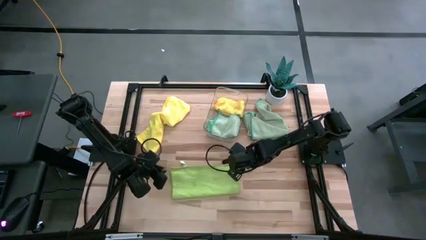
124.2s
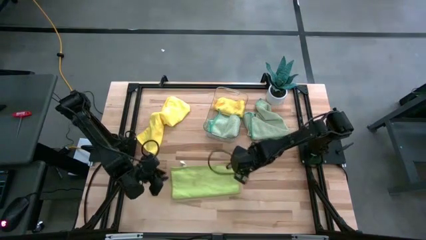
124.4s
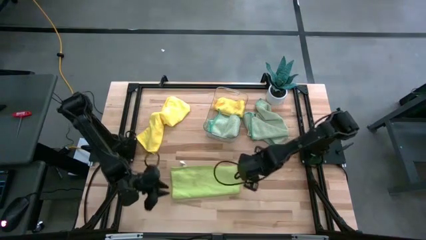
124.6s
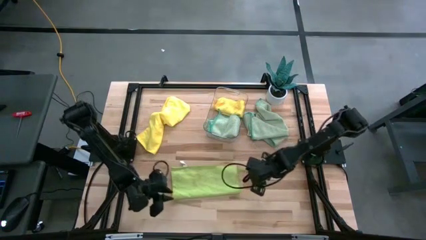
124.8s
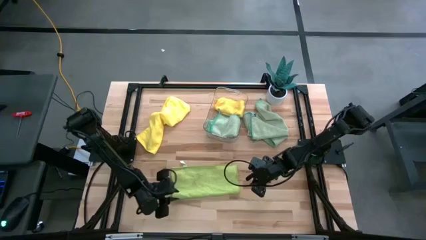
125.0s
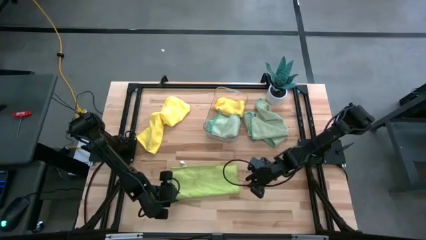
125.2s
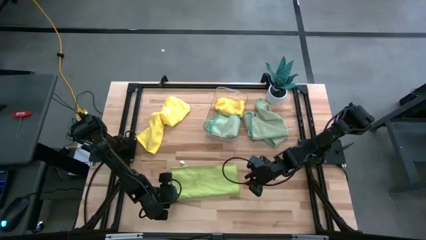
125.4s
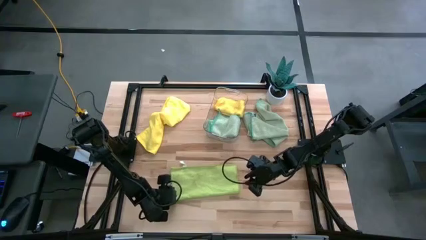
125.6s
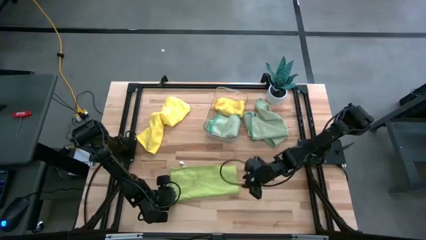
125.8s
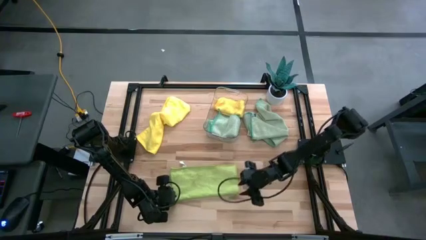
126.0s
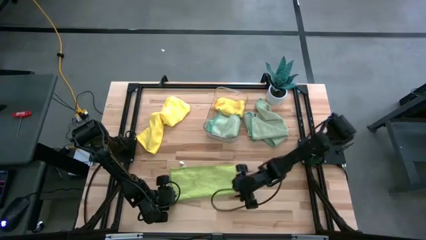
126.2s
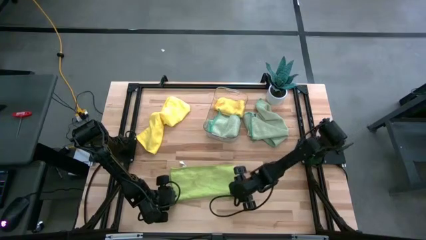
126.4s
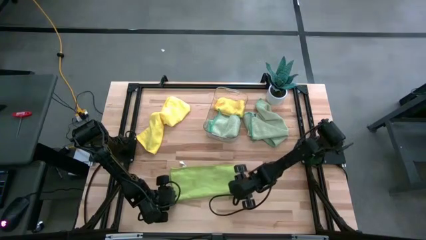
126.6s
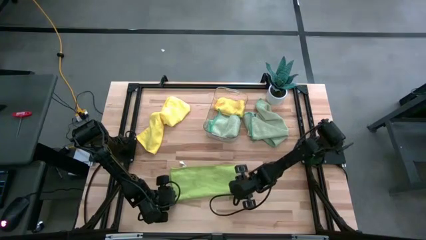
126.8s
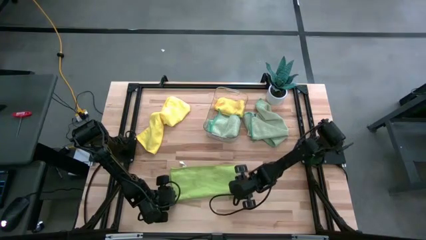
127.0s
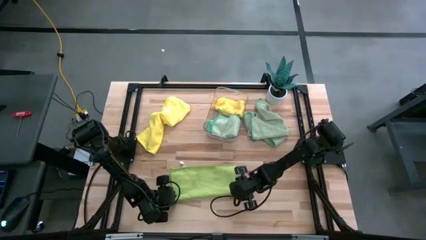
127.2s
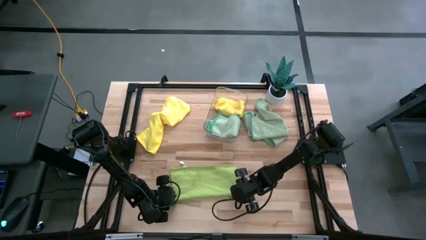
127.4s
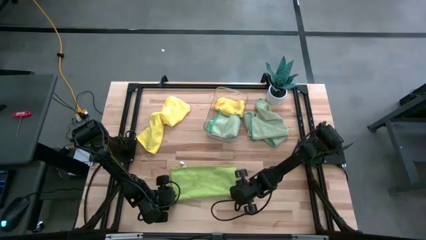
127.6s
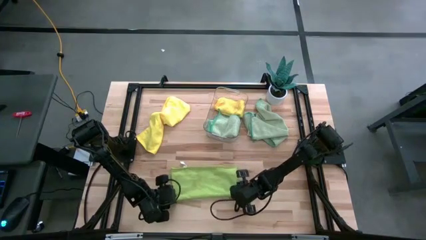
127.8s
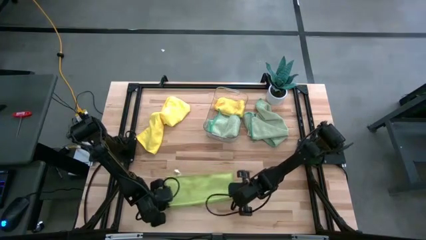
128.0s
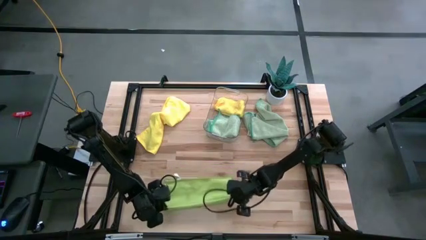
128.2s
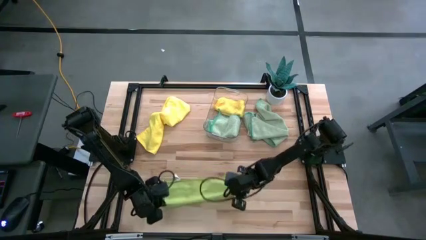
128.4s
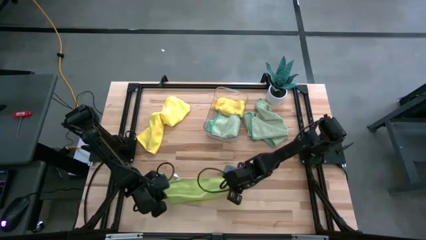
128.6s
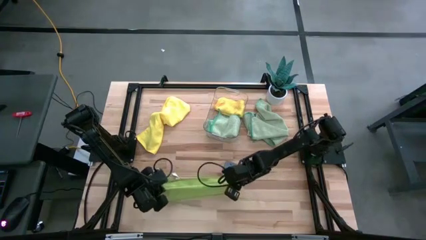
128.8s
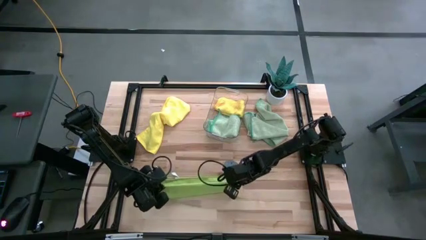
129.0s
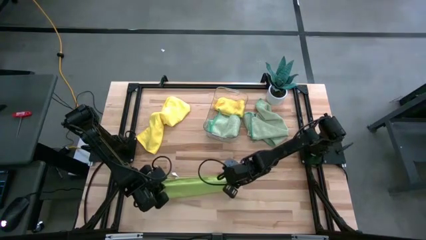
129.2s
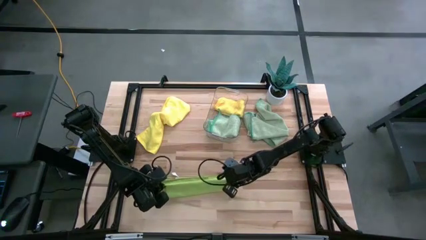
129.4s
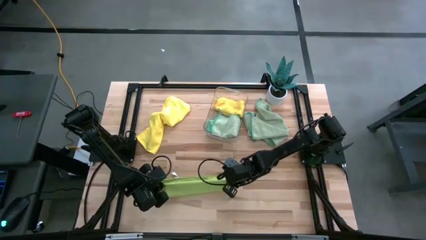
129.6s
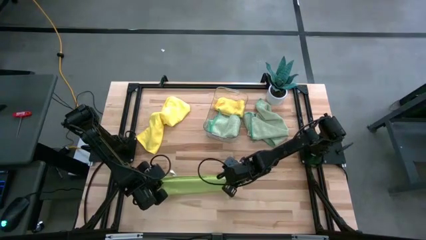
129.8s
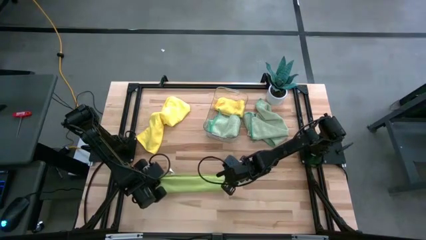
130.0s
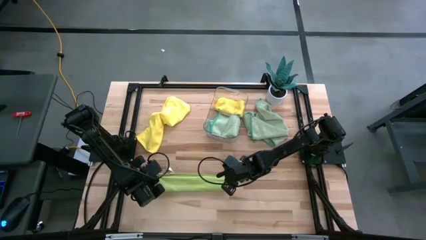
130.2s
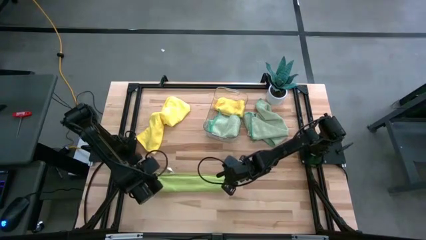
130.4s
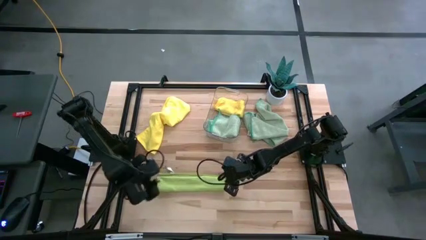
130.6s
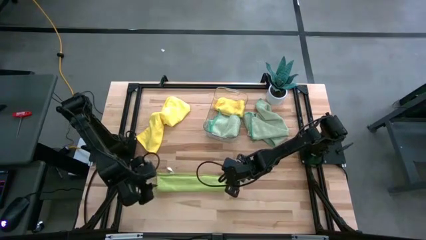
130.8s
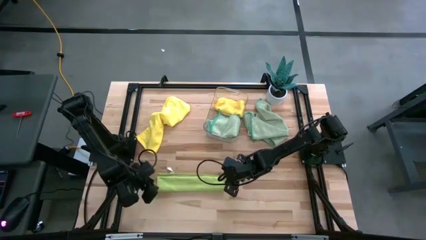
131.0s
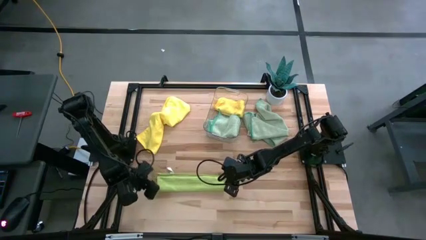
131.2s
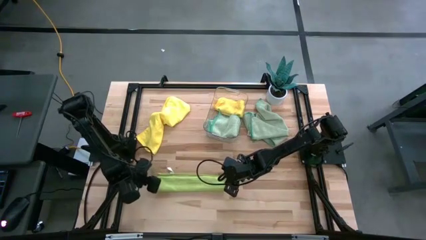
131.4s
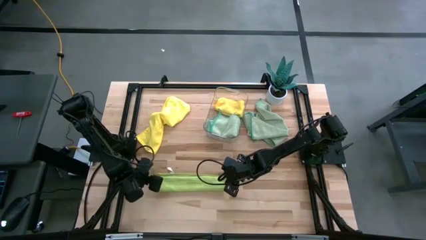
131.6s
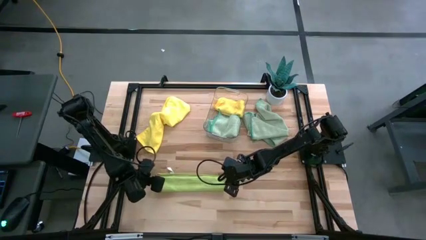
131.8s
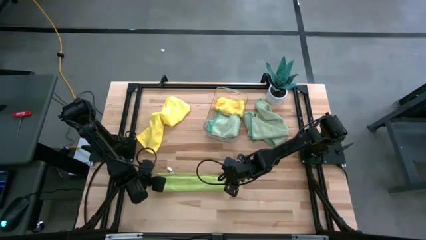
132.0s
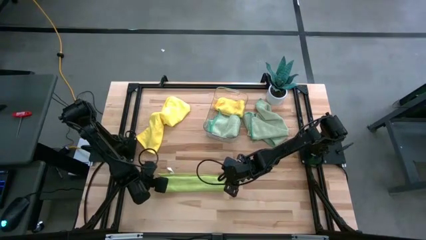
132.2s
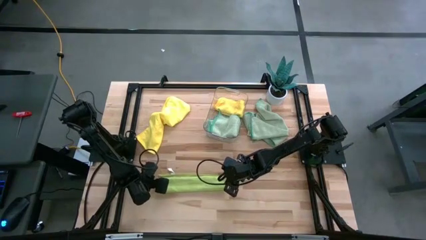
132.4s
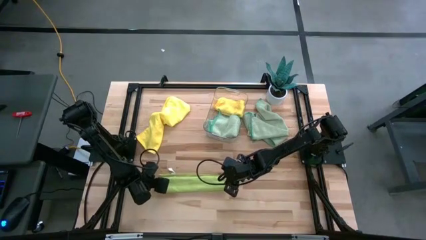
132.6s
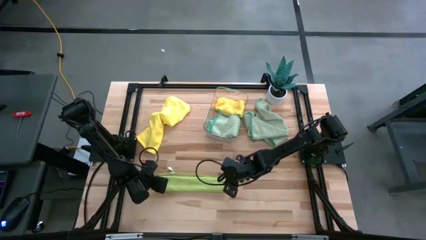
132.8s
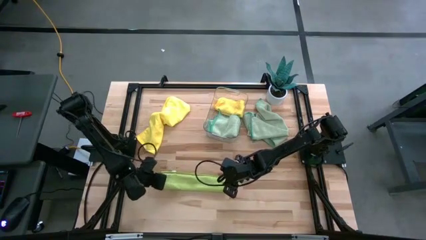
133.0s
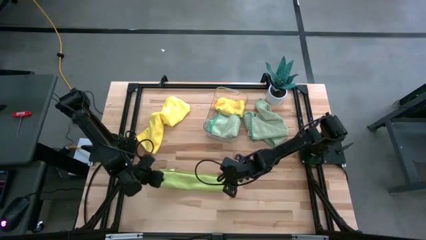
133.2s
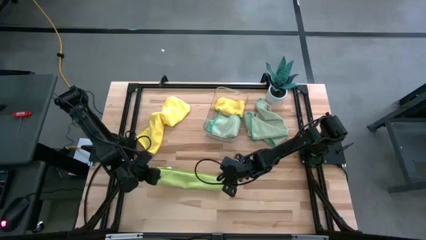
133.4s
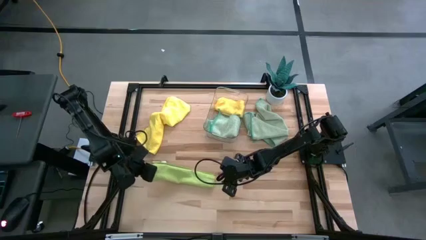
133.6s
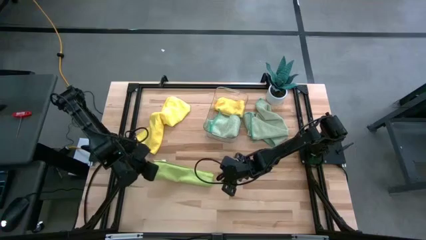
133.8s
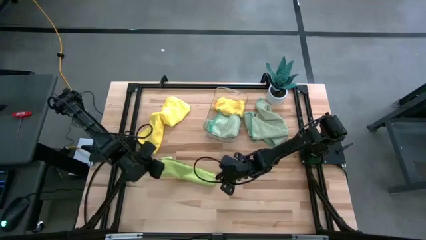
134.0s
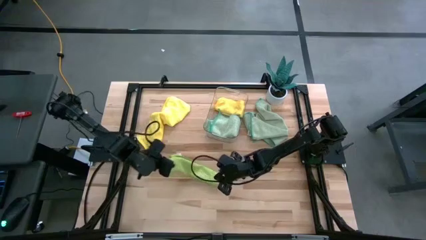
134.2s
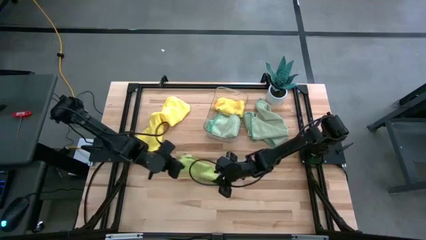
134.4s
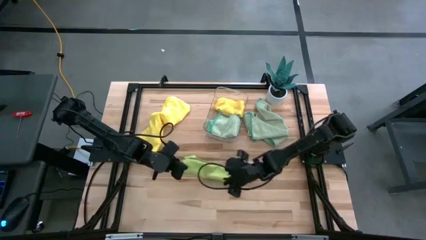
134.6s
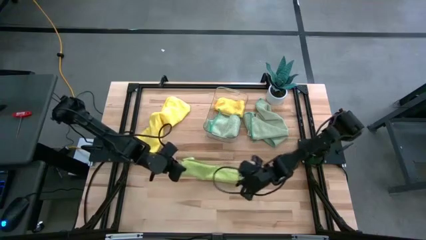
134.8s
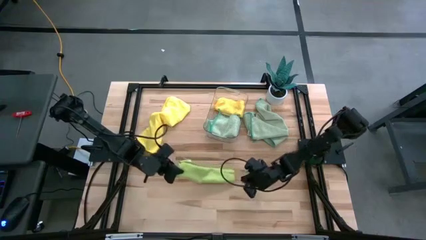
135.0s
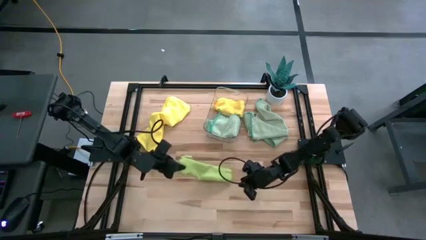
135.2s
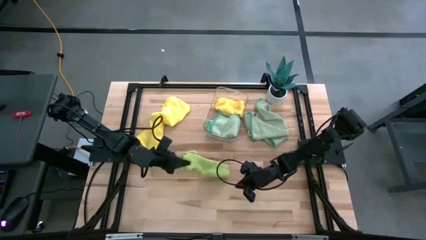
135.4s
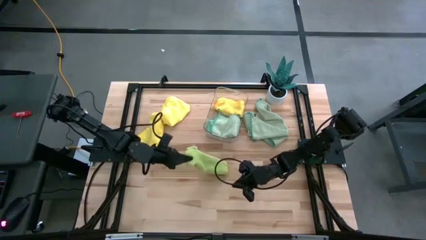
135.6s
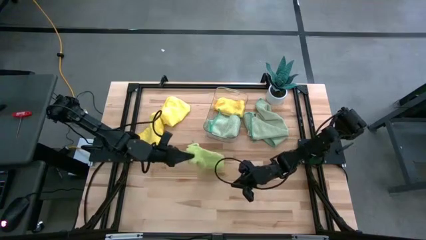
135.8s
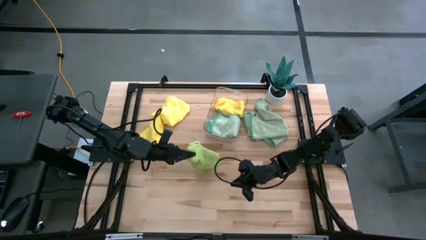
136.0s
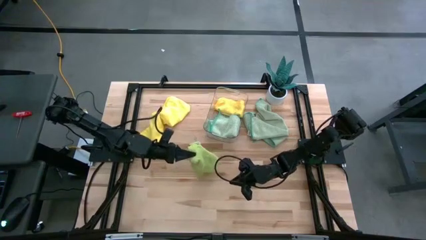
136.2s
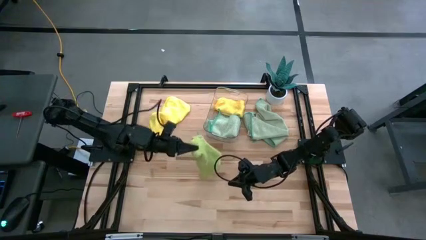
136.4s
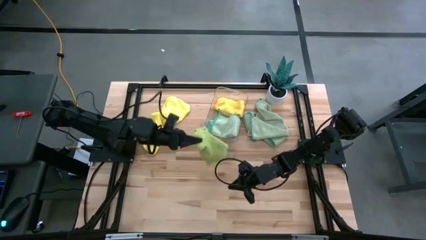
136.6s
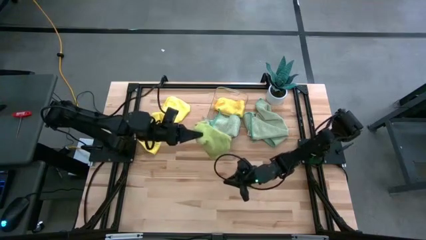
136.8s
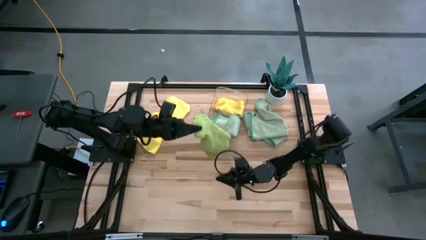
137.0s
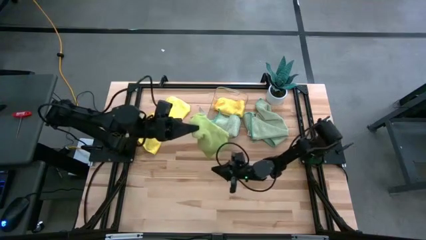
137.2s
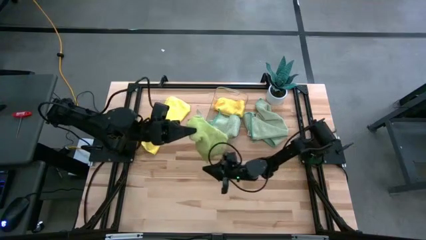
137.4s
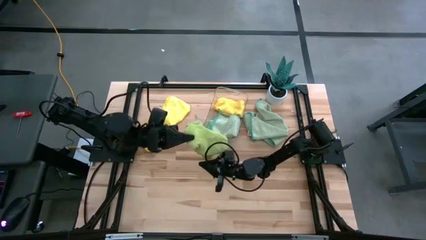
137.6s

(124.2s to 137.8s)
Task: Fold microfiber towels
Fold the green towel

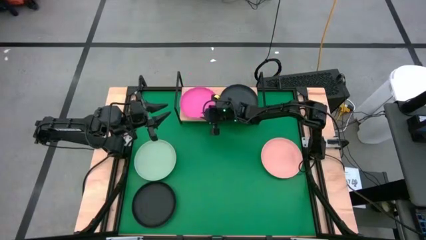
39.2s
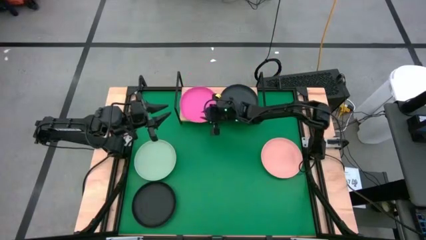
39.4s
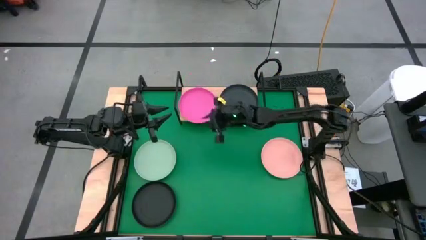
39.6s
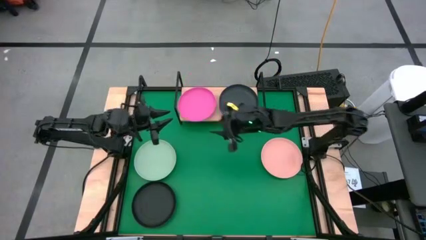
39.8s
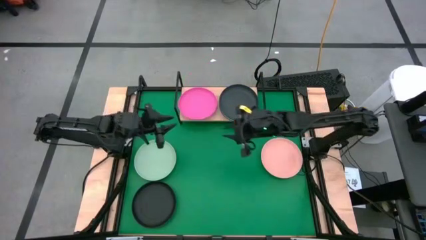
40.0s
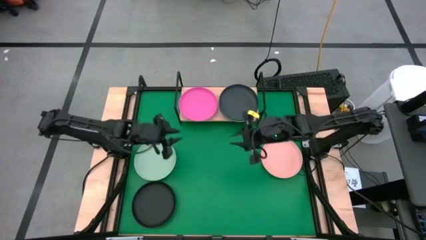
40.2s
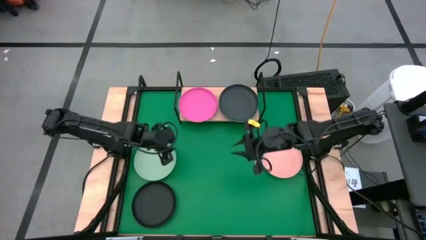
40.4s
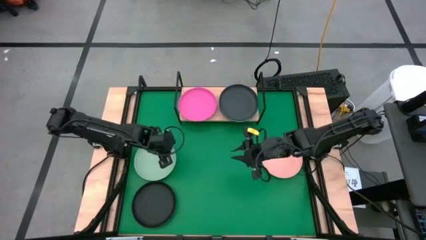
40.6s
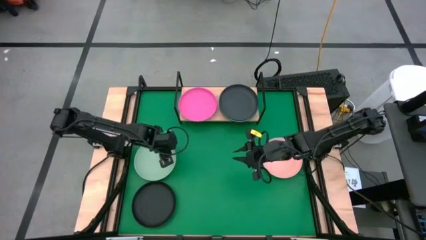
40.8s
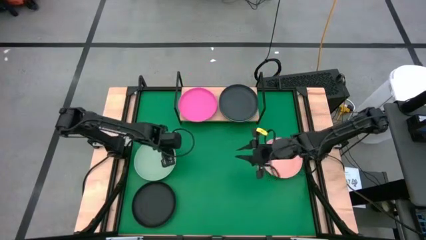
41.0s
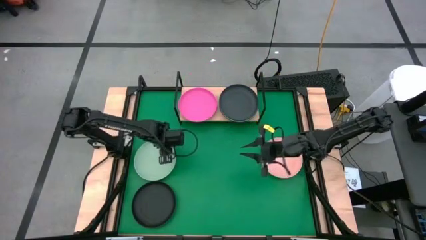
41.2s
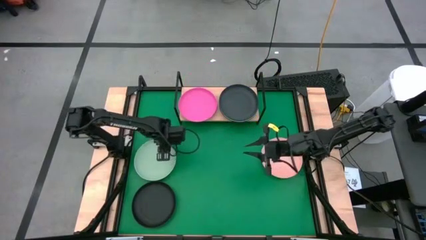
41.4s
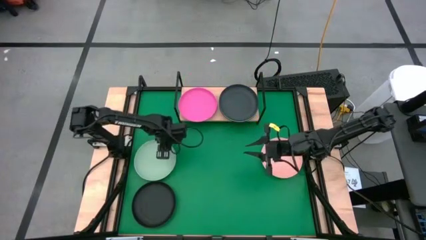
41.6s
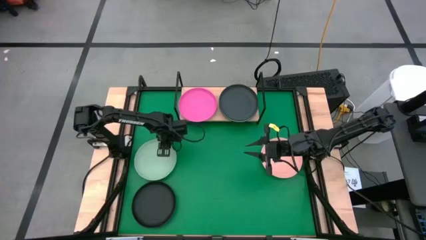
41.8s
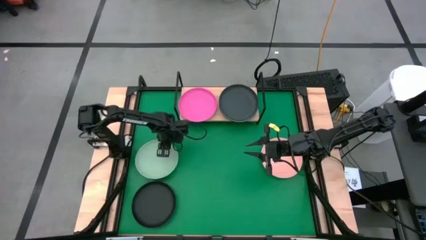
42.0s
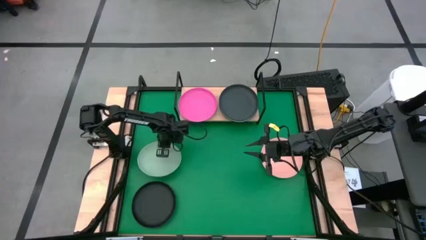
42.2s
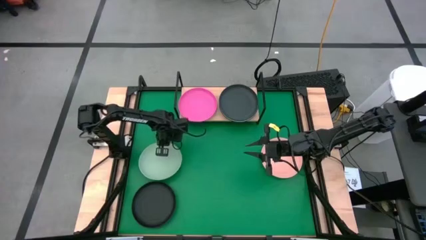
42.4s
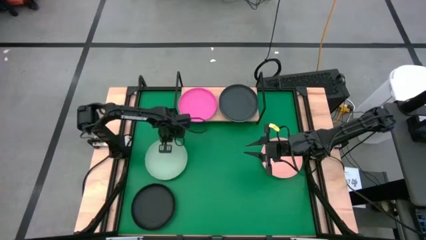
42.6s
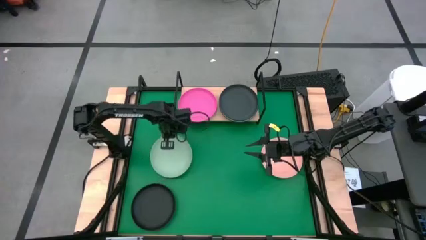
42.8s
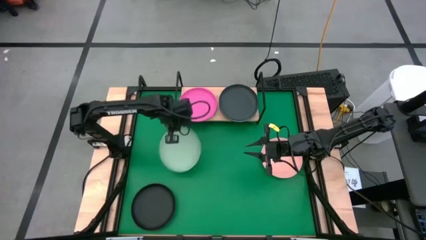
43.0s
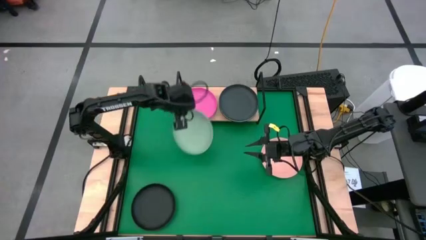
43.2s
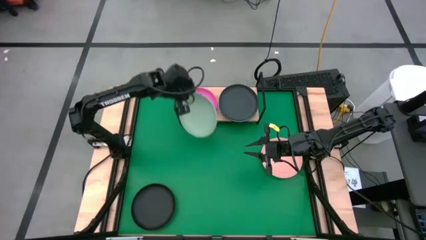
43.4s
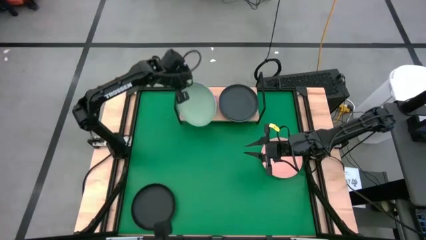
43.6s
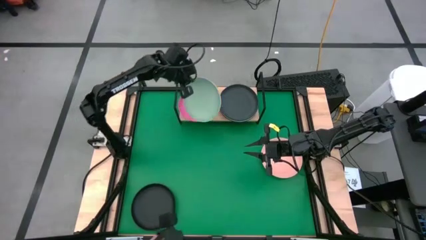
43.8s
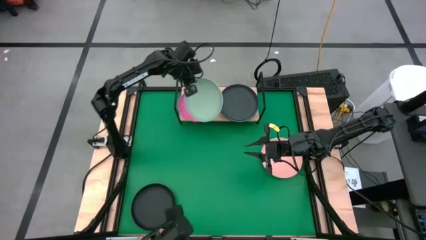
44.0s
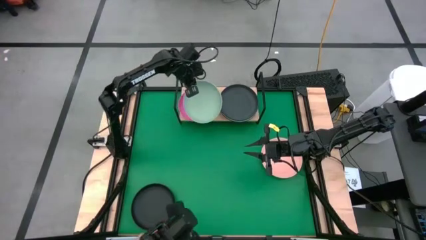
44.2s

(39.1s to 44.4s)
Task: Place and stack plates onto a shelf
Stack the green plate on top of the pink plate on the shelf
